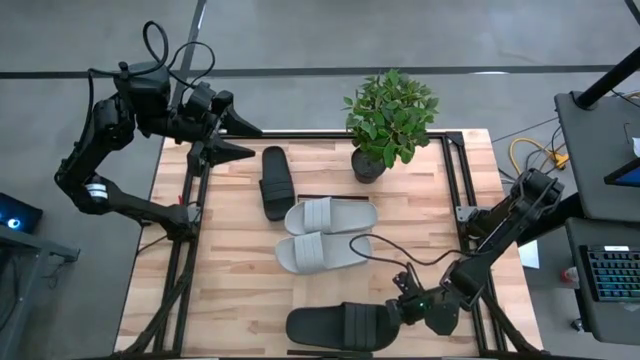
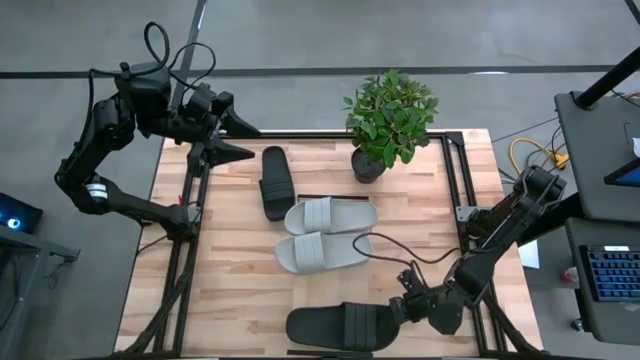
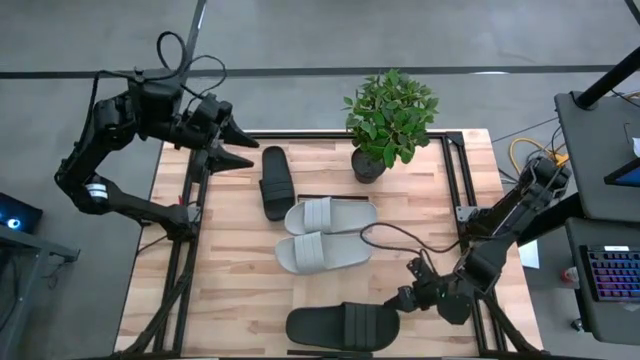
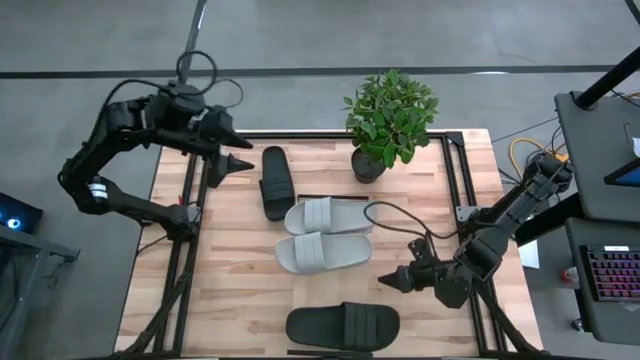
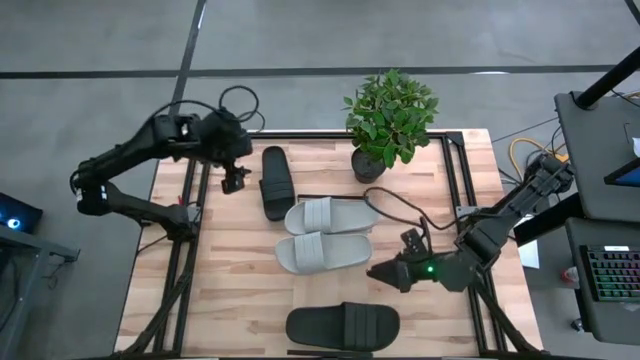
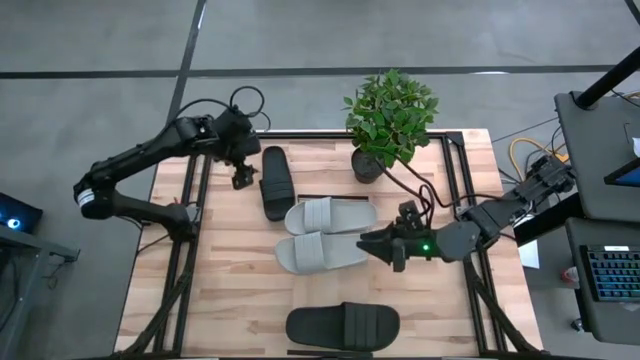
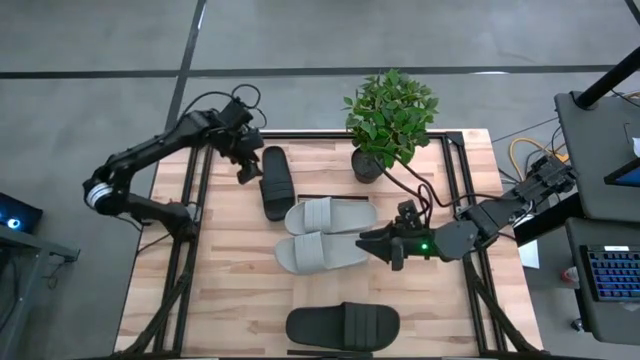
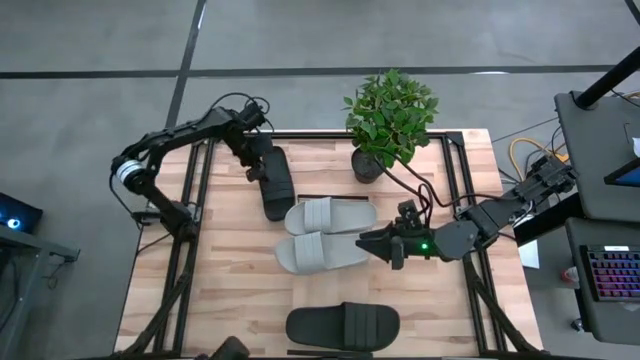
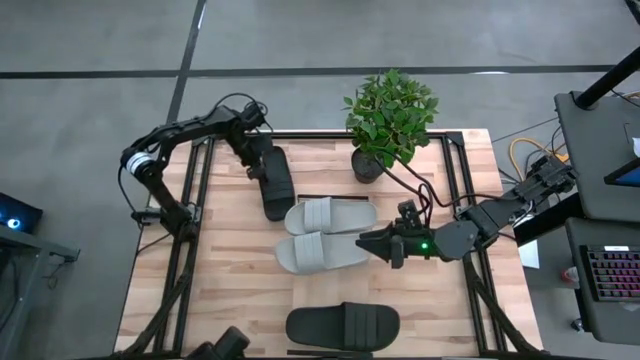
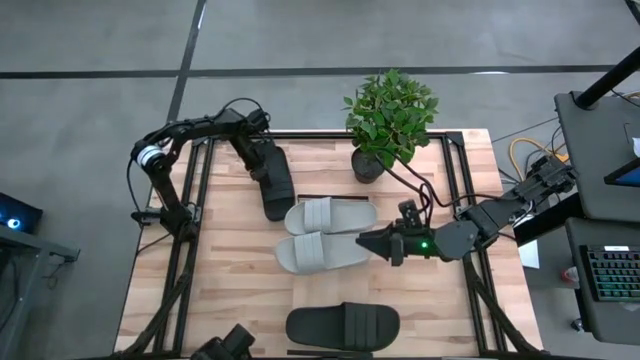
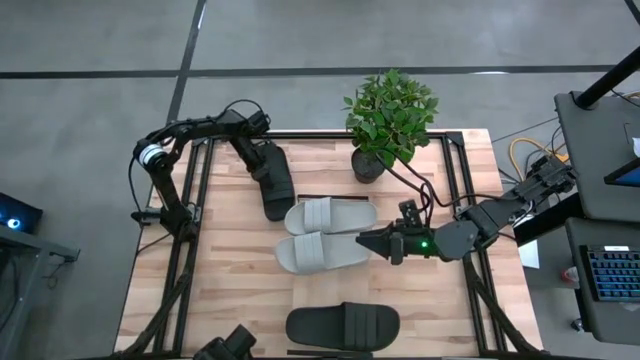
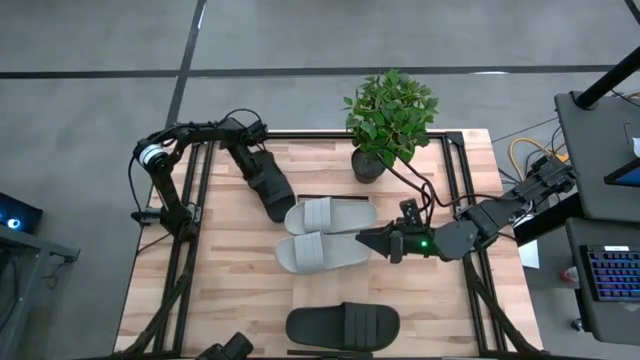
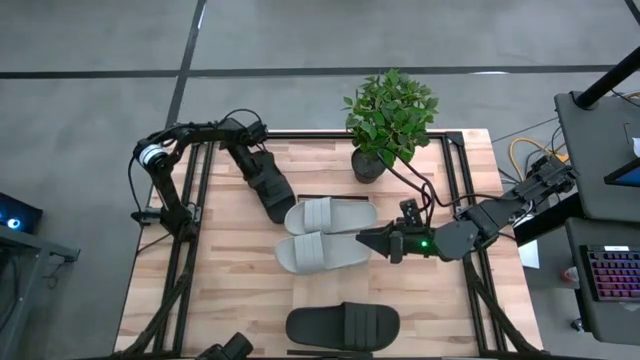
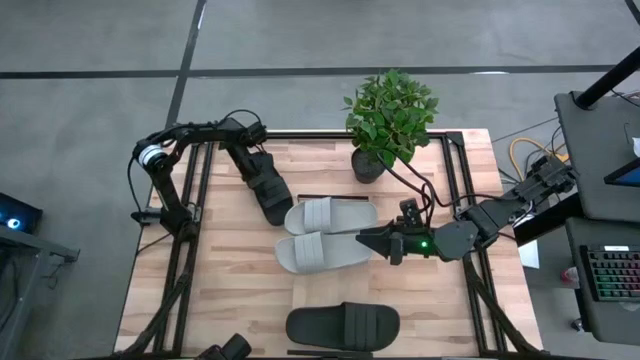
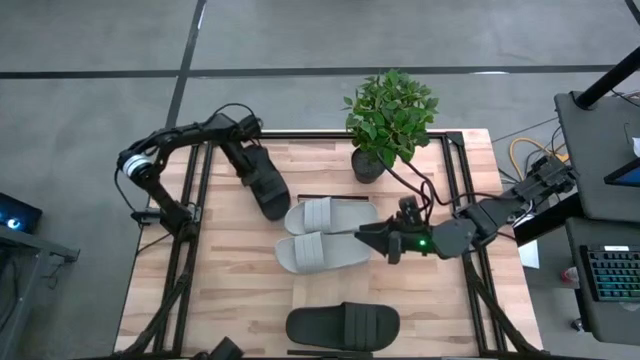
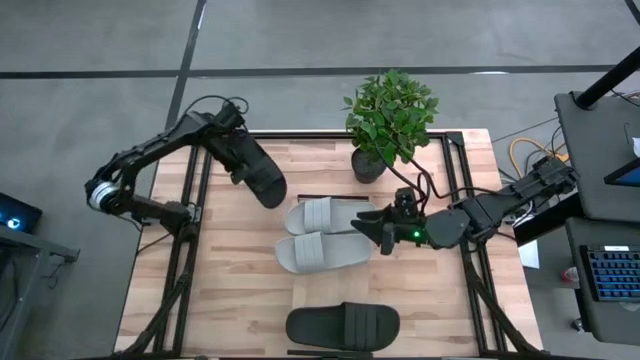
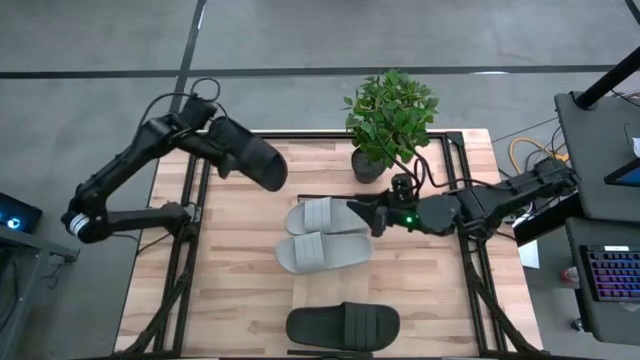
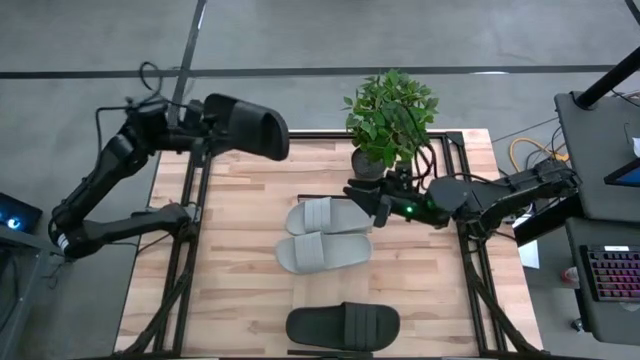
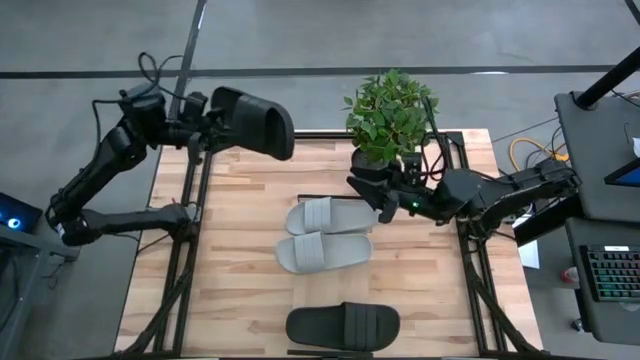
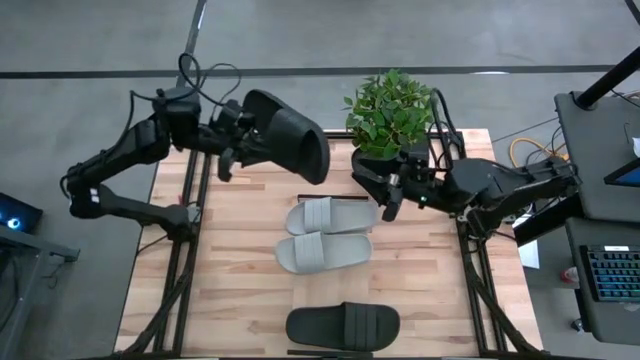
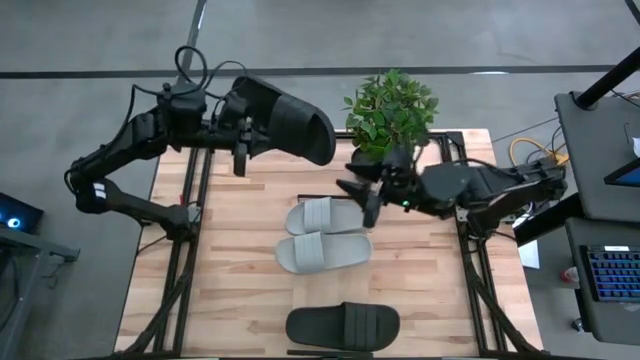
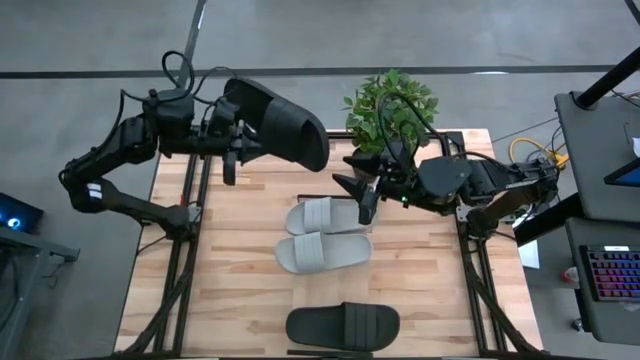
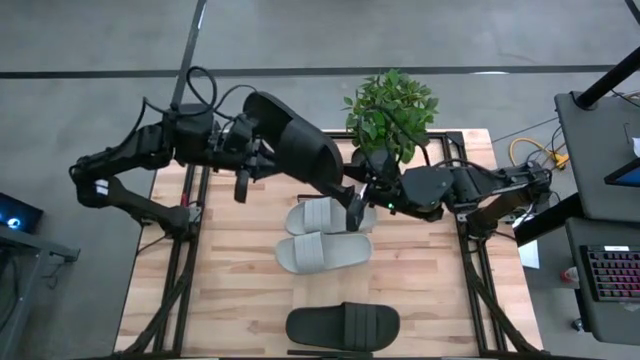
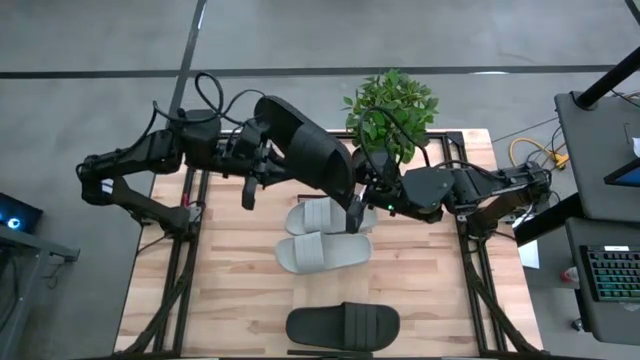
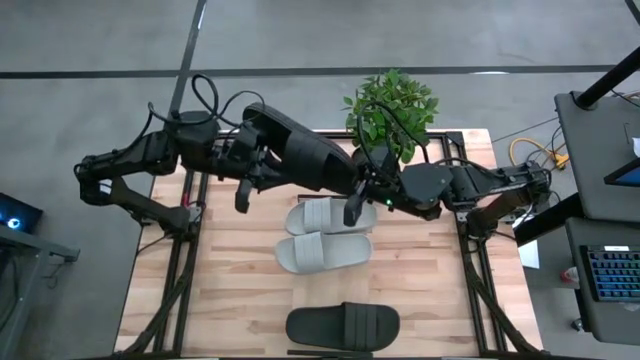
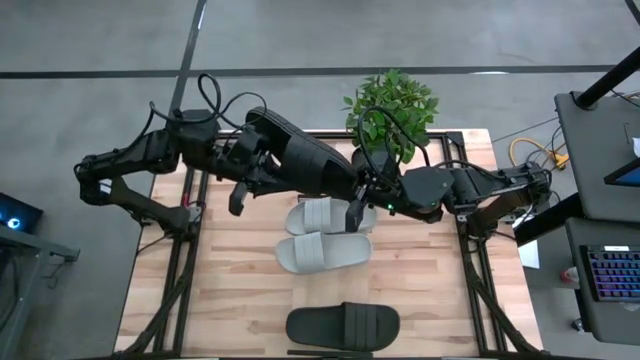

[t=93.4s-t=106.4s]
Task: Pick and place slides into the shelf
Put the black slipper on the shelf

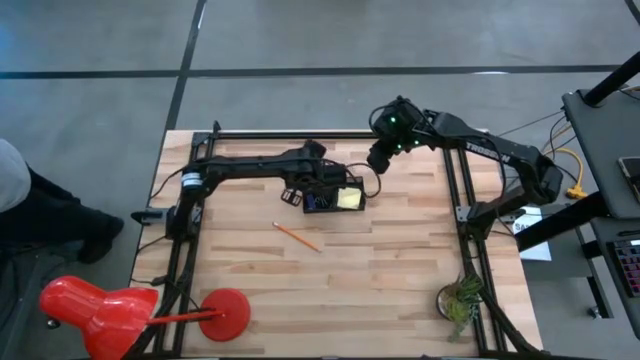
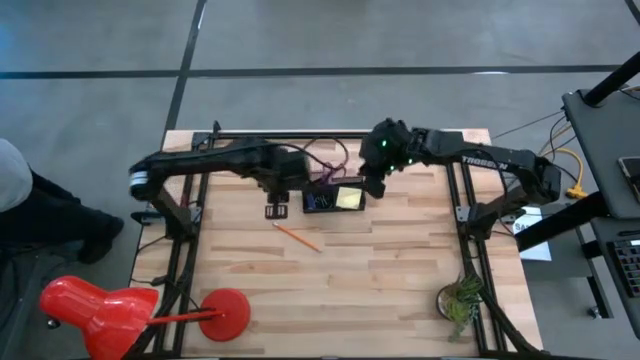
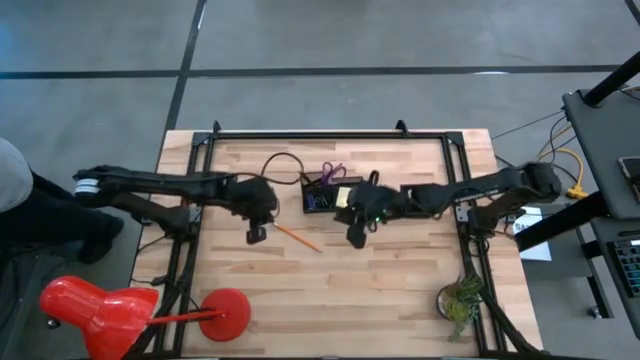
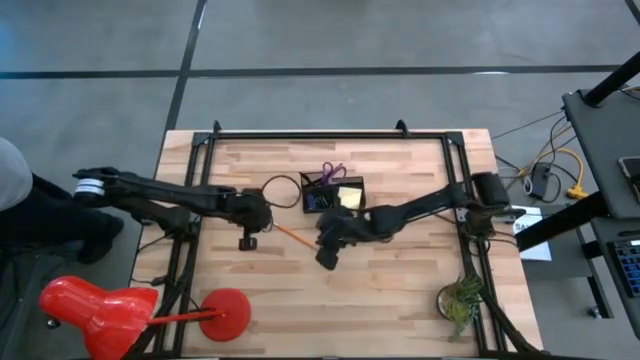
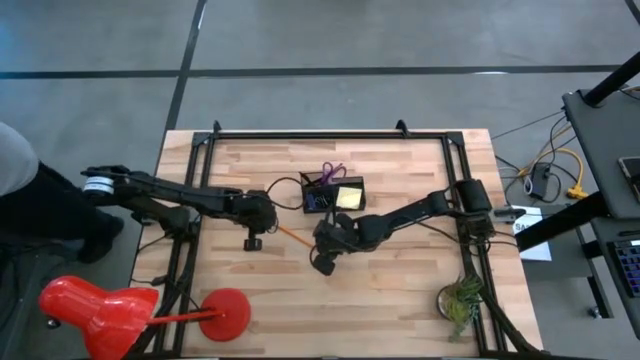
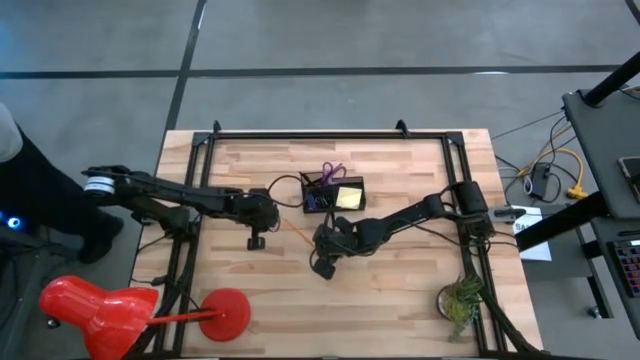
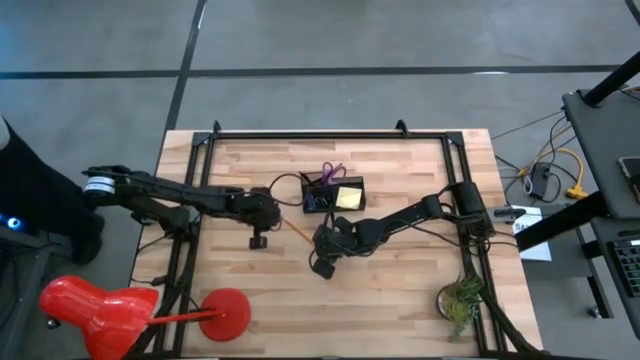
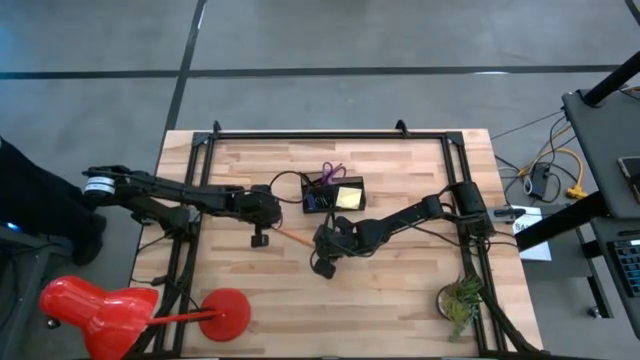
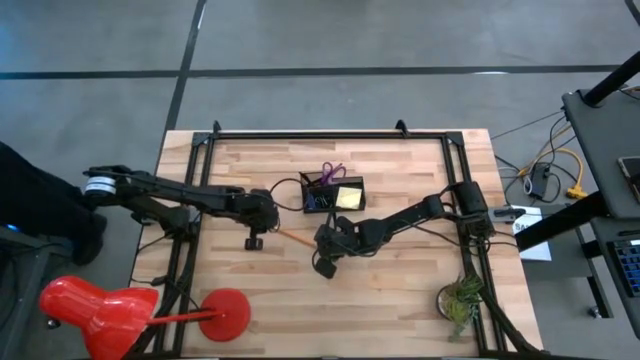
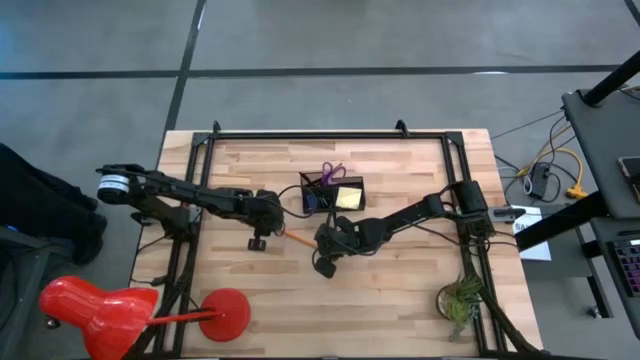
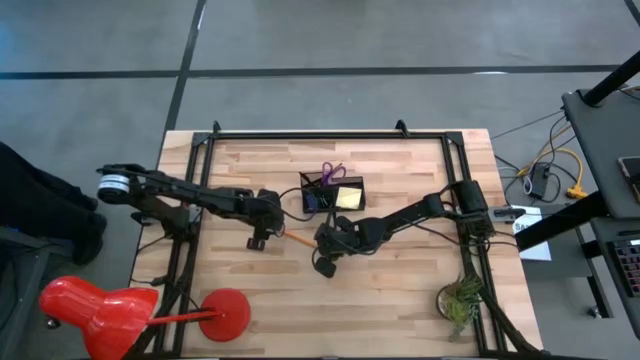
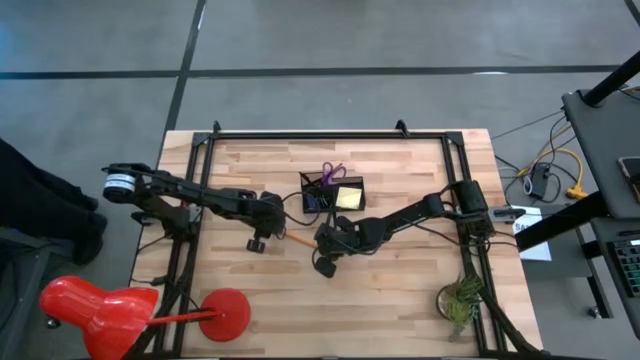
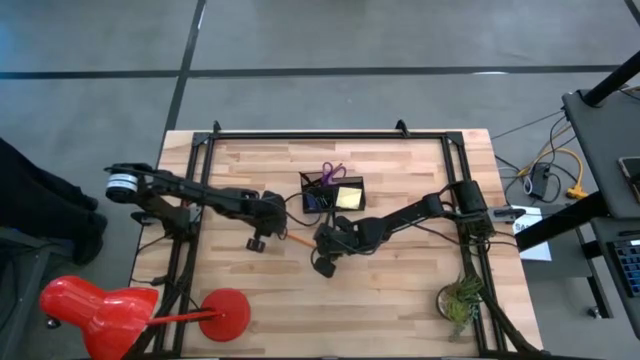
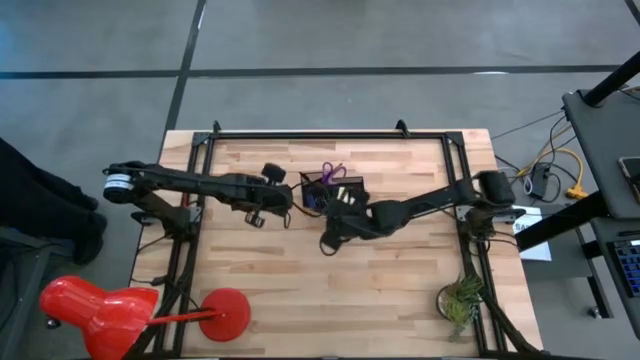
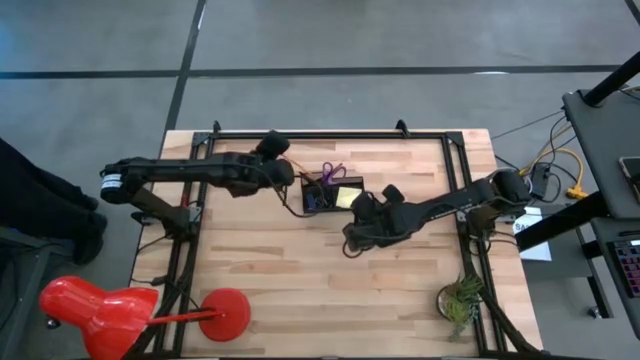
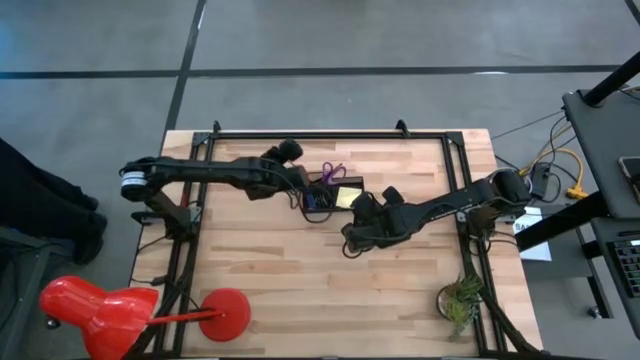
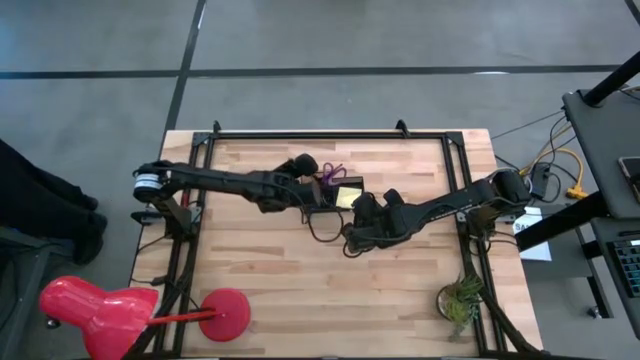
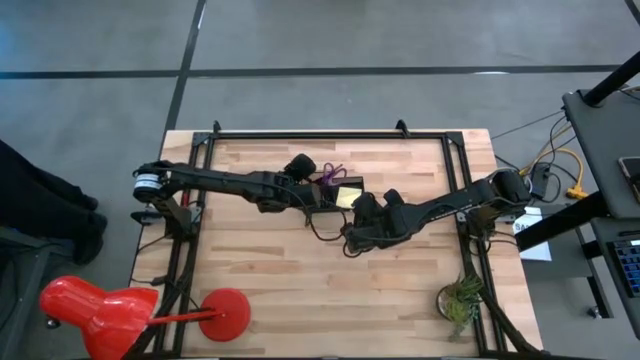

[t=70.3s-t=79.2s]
Task: Pick and place office supplies into organizer
Put the yellow pencil into the black desk organizer
